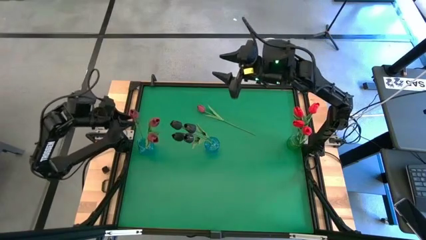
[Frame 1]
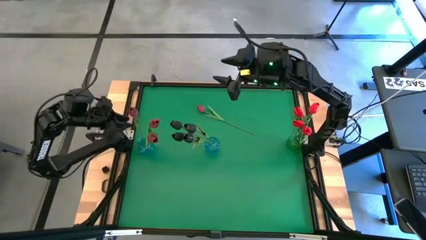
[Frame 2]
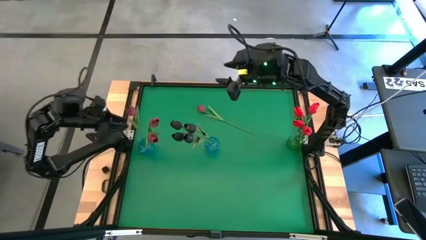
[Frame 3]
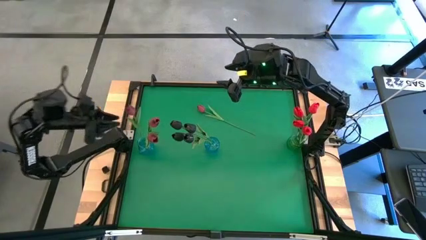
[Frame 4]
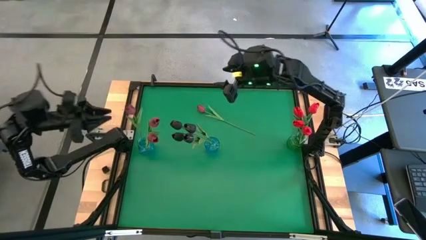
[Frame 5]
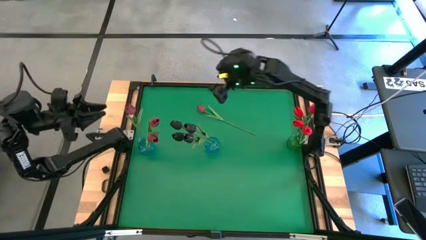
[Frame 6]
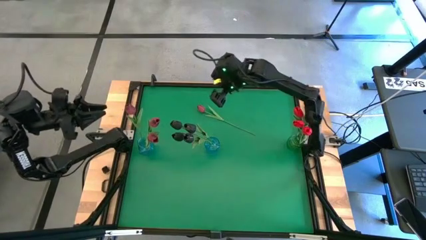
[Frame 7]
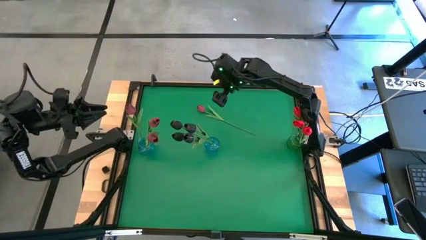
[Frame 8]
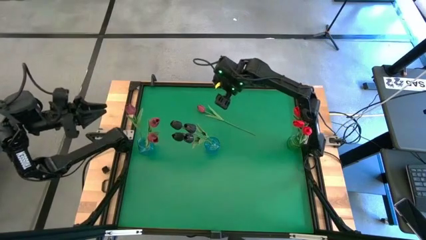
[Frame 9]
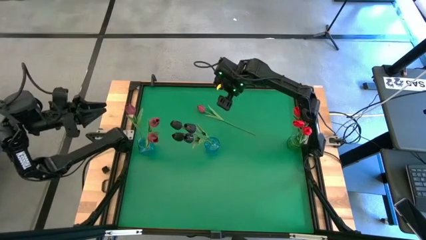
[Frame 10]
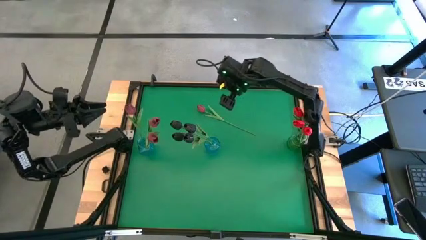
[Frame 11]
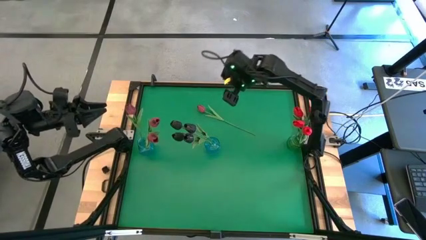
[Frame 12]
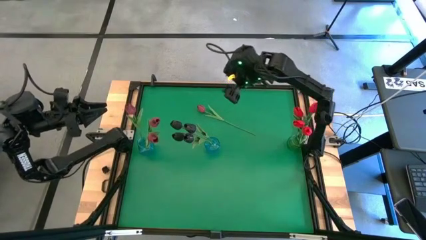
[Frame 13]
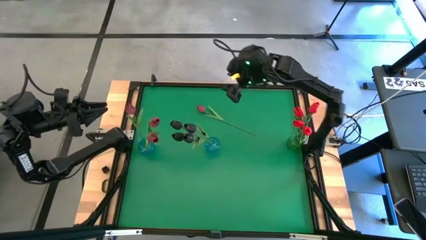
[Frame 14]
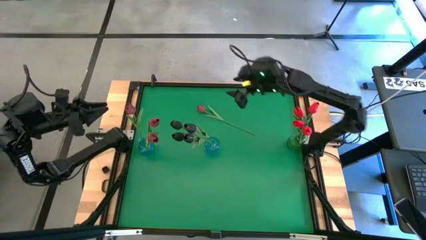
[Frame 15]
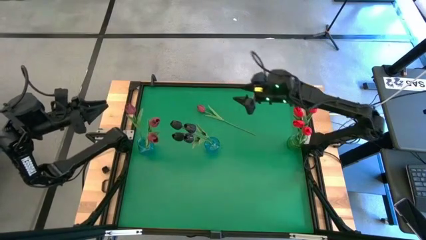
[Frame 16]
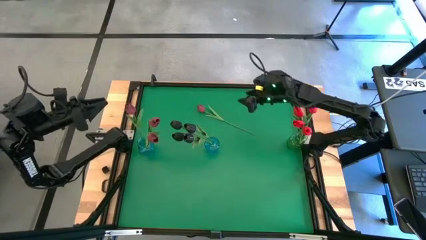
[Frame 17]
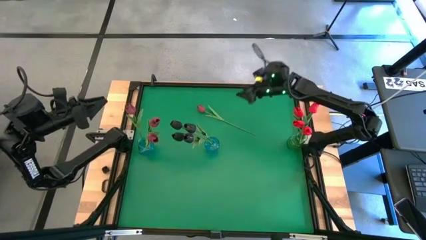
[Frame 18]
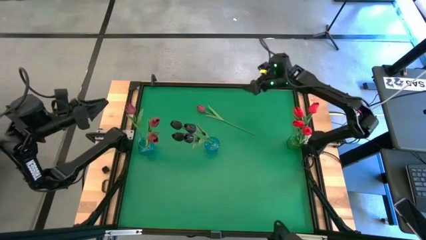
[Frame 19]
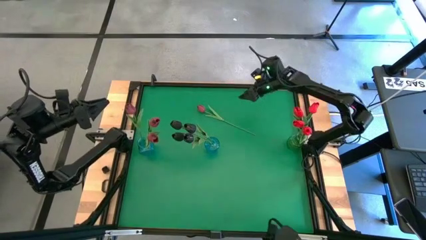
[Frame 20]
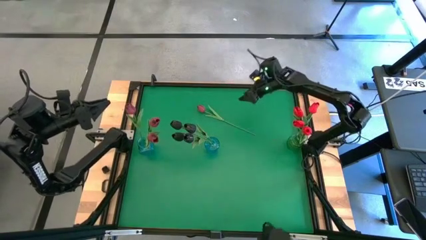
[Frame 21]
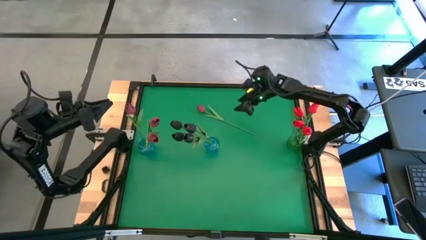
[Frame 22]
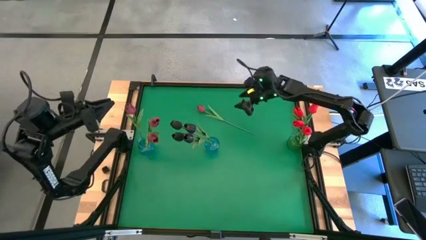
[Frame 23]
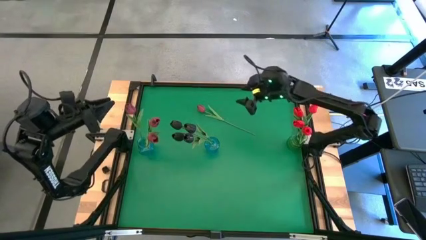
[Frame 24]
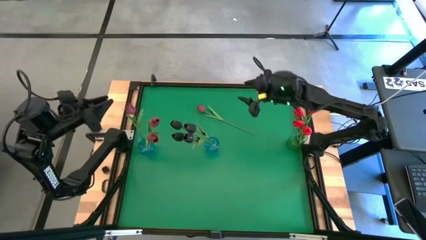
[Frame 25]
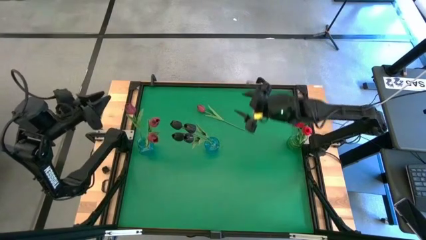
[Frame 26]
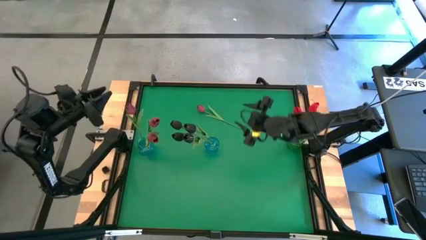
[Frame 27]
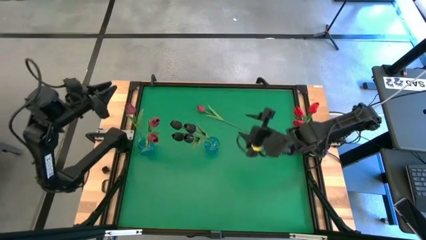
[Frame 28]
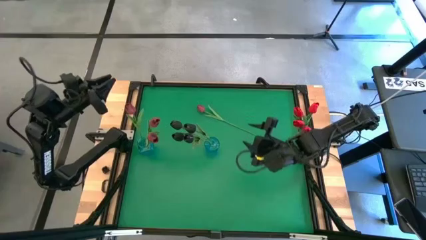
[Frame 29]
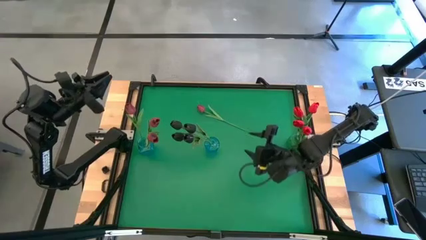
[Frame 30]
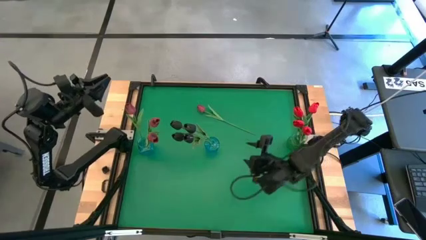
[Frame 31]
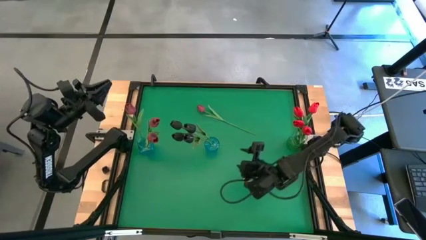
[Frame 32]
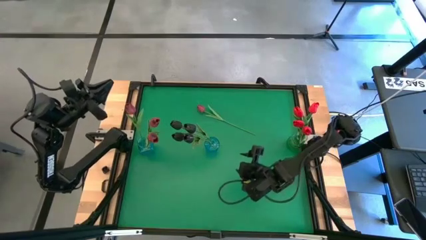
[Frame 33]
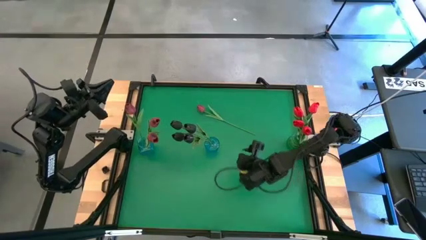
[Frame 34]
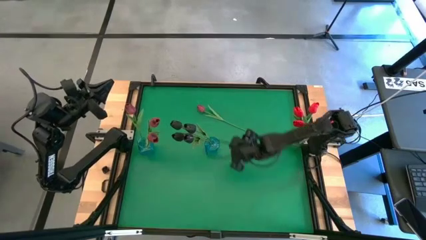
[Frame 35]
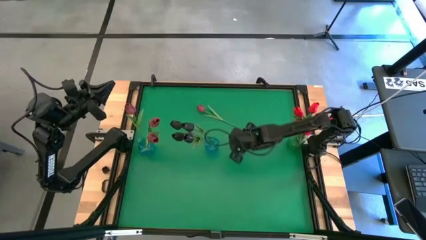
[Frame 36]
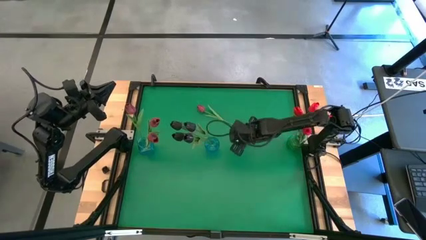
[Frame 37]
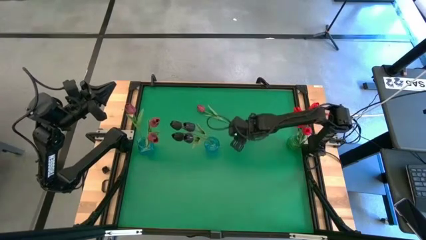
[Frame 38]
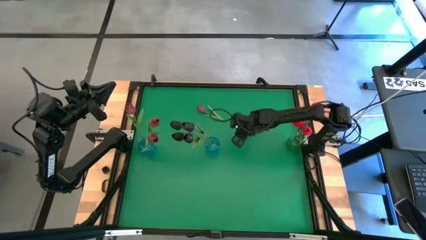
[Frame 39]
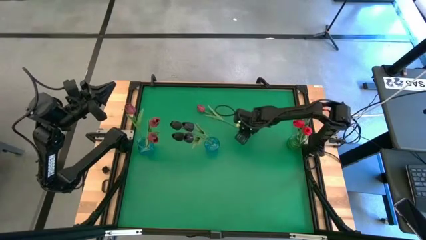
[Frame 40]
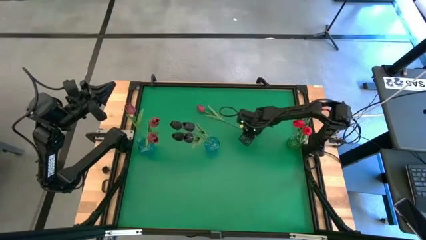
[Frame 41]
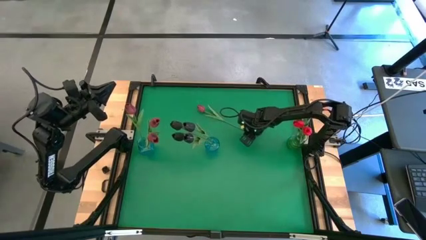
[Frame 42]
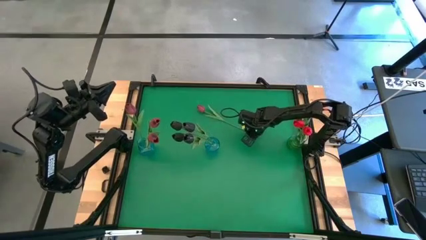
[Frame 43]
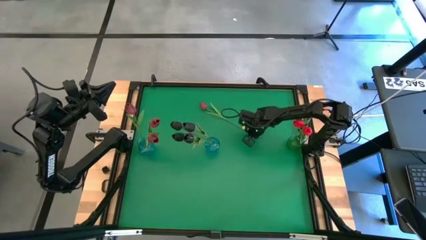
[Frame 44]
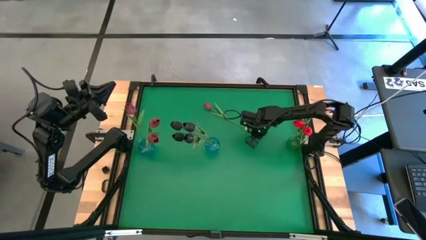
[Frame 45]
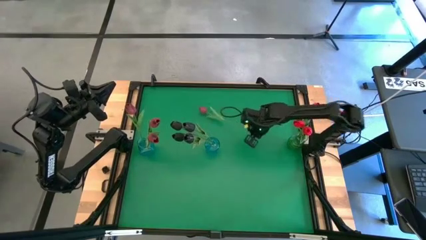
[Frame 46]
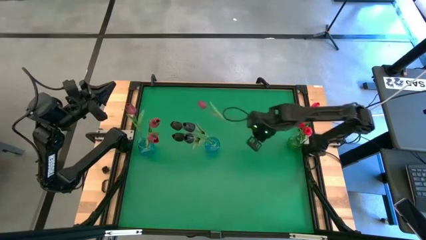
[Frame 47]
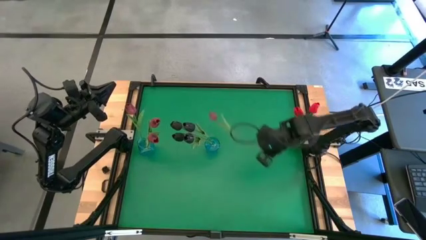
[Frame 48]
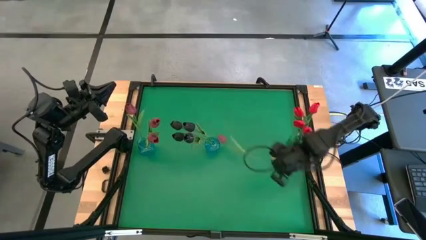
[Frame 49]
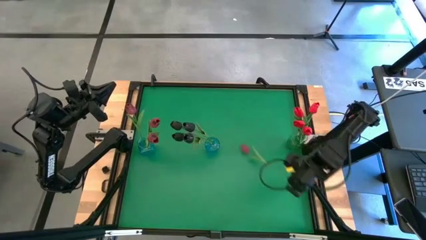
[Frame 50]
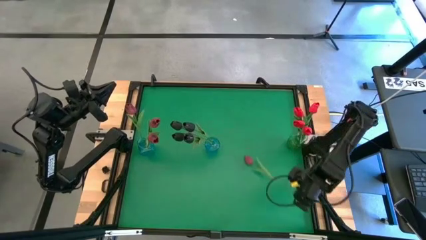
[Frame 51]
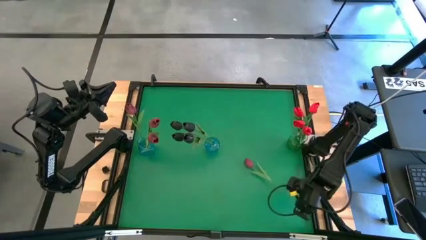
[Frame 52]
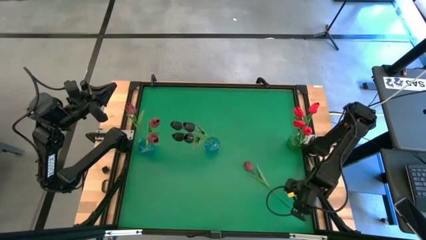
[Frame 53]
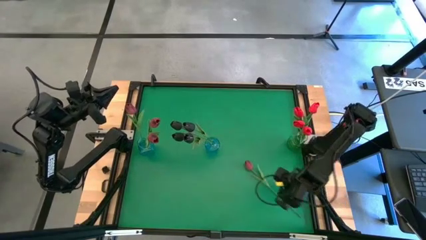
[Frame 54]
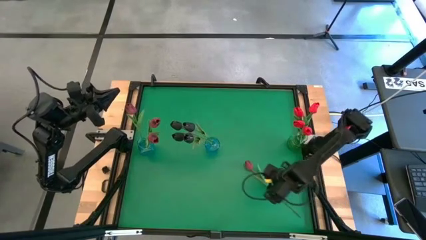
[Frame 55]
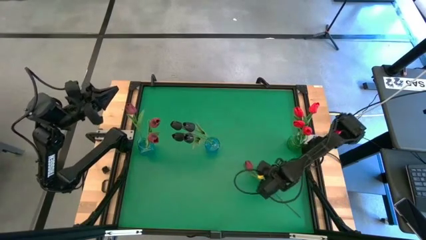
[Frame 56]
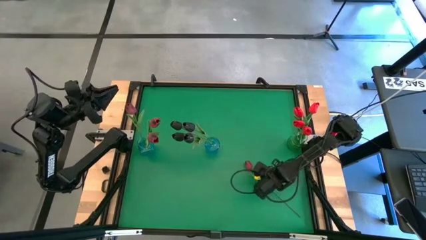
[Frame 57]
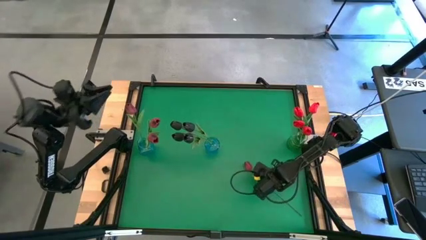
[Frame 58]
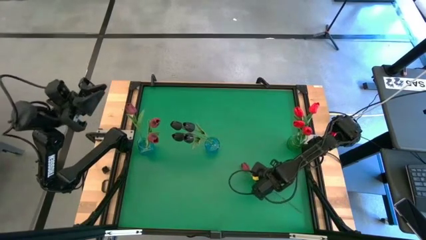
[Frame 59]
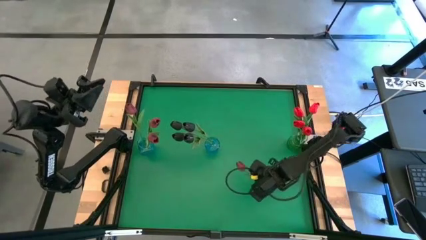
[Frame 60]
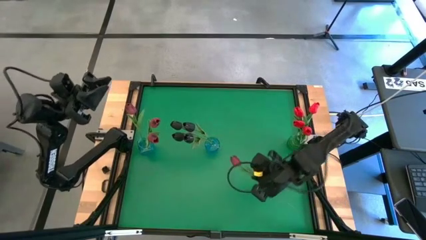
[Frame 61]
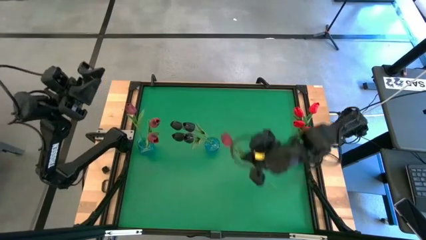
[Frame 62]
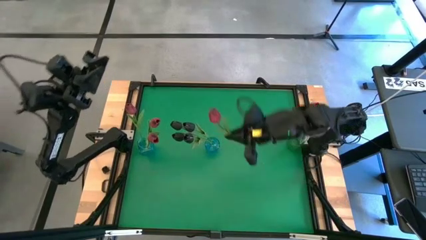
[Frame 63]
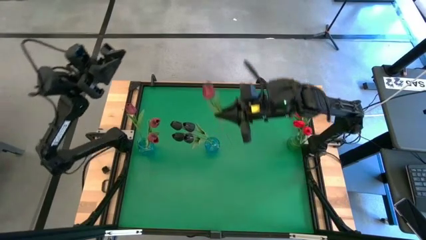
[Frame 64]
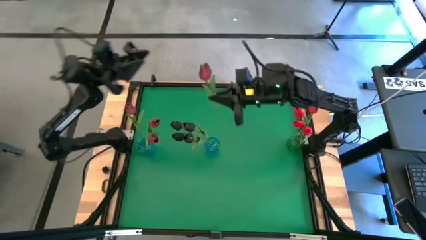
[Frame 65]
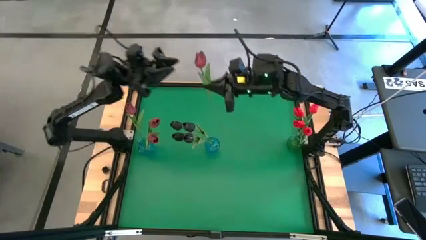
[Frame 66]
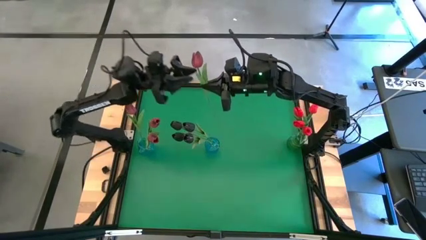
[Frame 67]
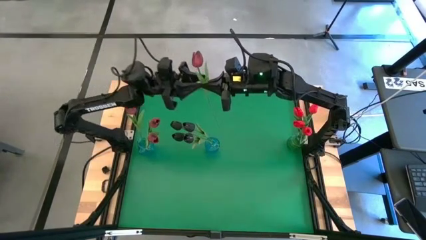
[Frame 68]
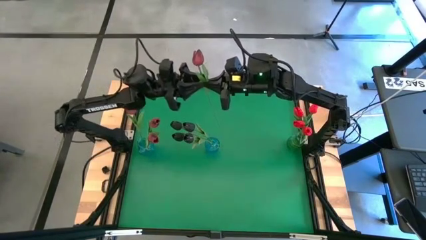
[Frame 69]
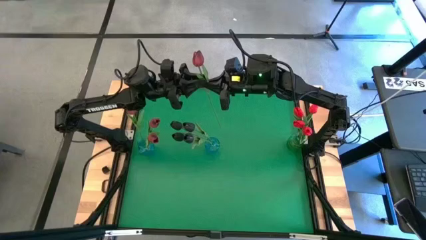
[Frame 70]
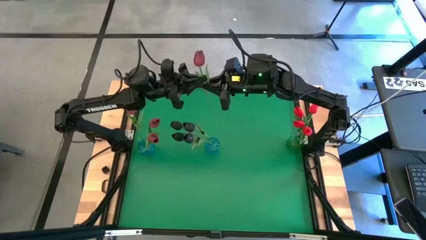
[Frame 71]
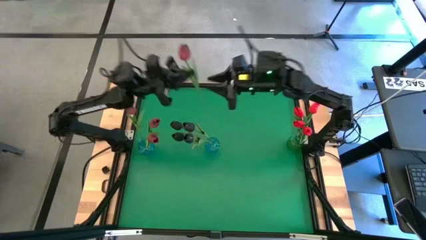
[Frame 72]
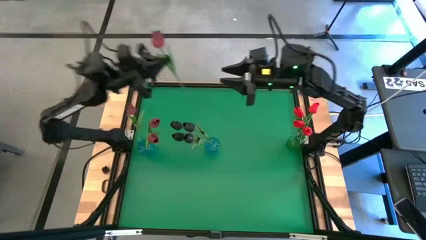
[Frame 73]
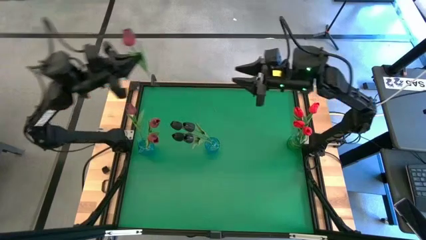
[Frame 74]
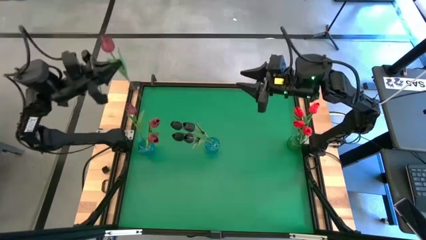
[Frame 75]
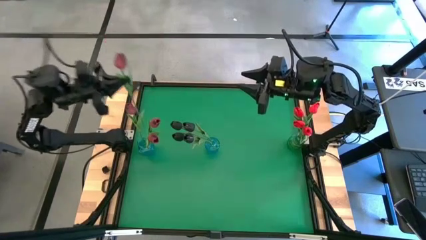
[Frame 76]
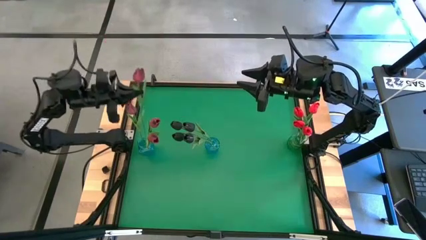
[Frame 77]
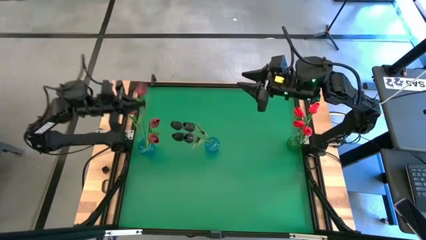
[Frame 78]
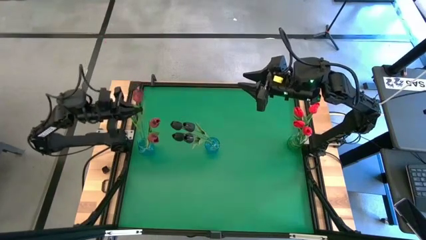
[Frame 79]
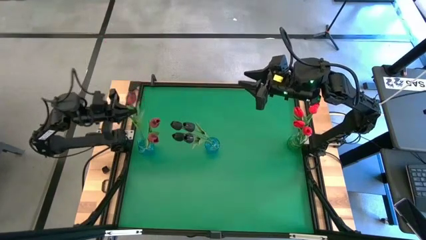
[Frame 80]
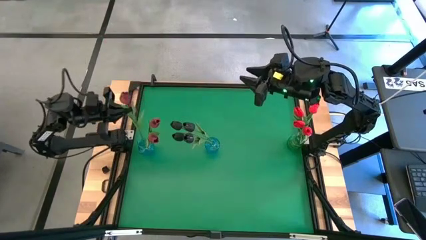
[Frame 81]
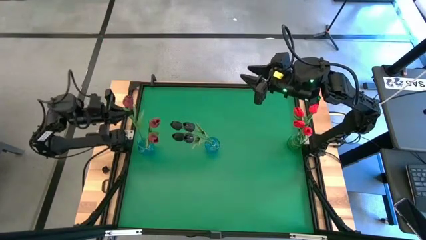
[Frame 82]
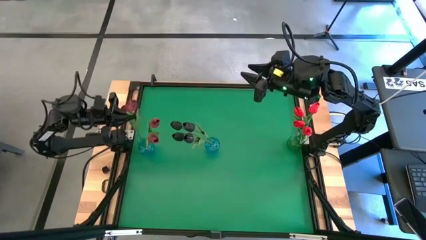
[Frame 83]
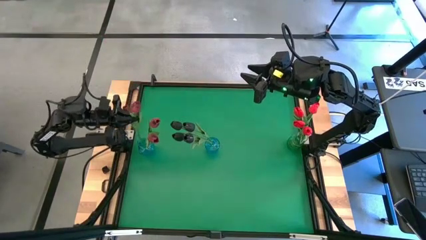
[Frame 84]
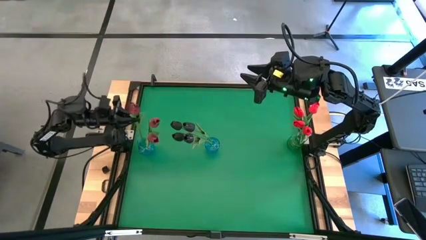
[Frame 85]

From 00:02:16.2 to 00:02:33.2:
Task: Sort flowers into vase by color
Put the red flower into the left blue flower vase
